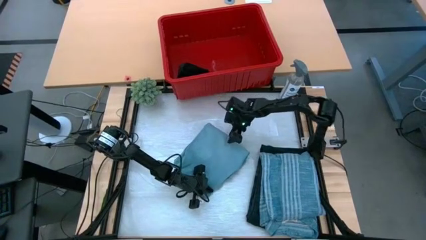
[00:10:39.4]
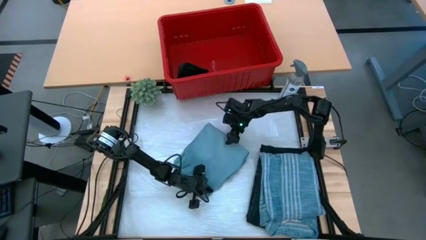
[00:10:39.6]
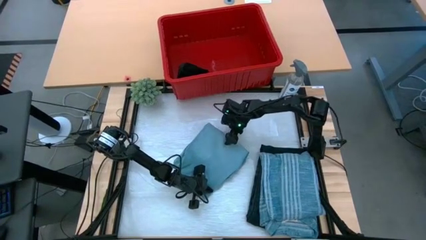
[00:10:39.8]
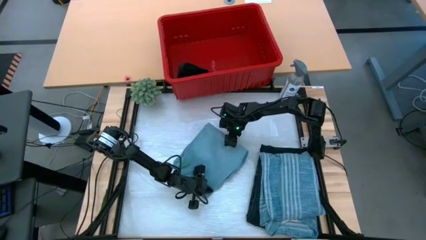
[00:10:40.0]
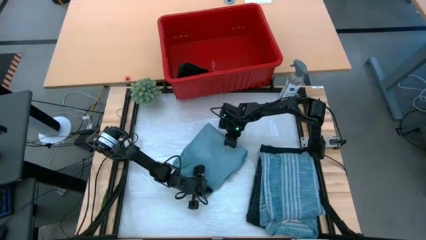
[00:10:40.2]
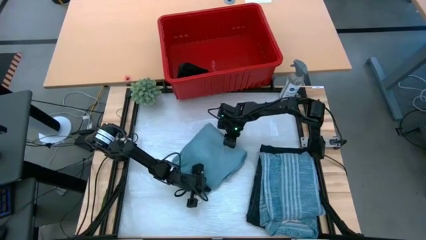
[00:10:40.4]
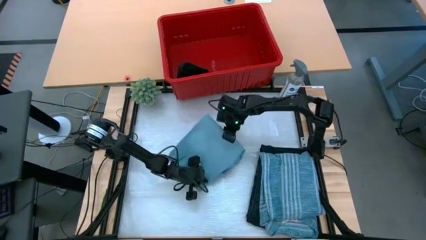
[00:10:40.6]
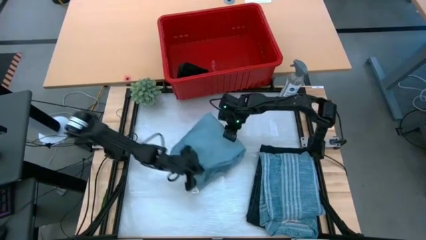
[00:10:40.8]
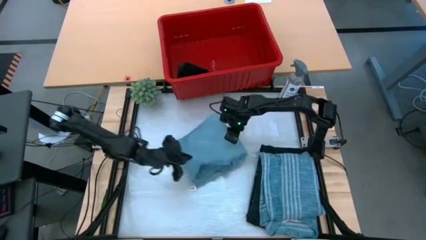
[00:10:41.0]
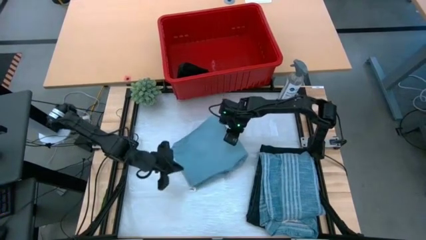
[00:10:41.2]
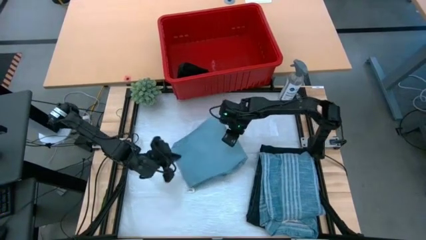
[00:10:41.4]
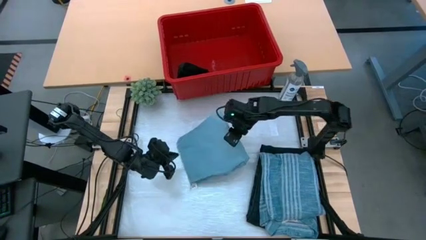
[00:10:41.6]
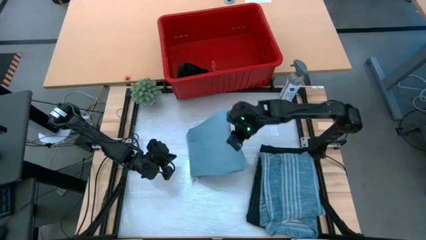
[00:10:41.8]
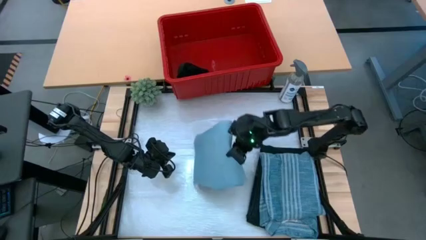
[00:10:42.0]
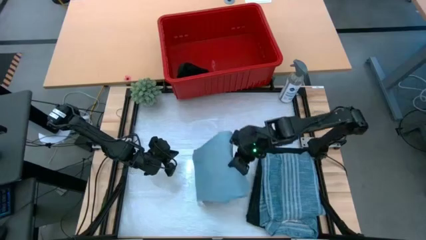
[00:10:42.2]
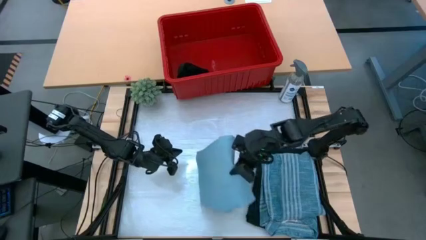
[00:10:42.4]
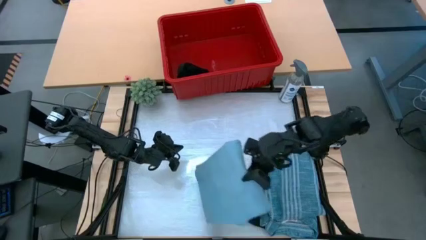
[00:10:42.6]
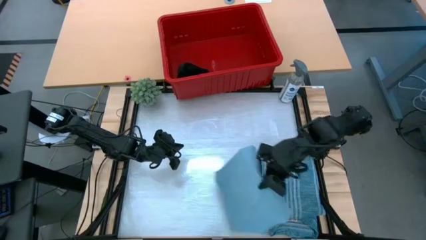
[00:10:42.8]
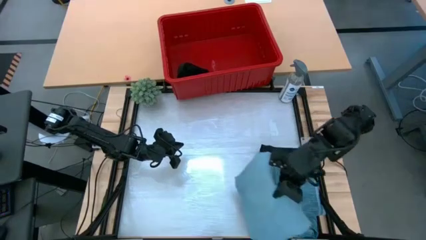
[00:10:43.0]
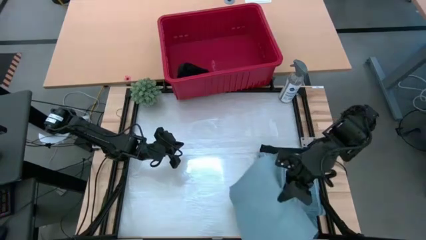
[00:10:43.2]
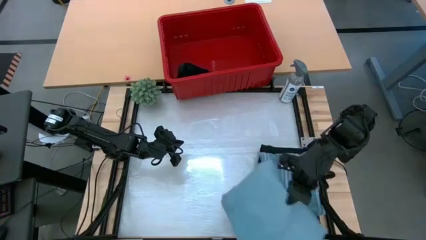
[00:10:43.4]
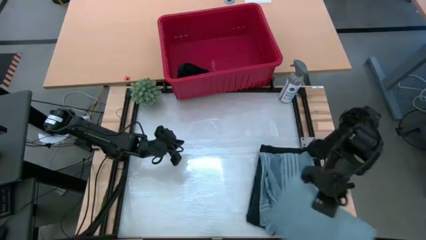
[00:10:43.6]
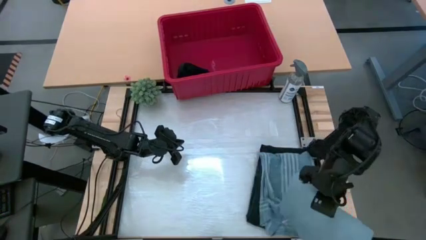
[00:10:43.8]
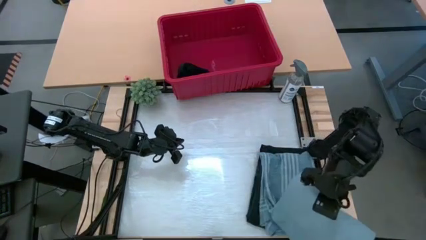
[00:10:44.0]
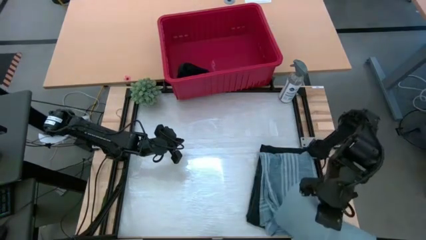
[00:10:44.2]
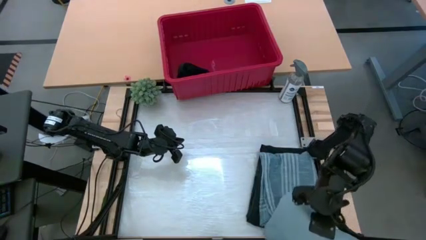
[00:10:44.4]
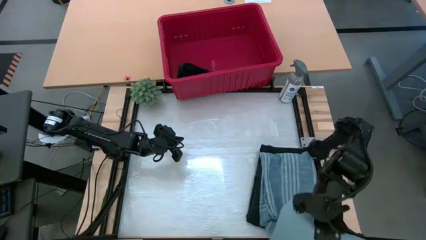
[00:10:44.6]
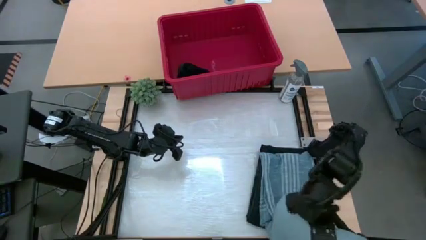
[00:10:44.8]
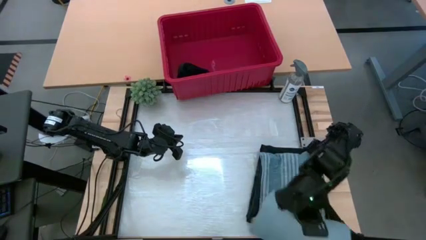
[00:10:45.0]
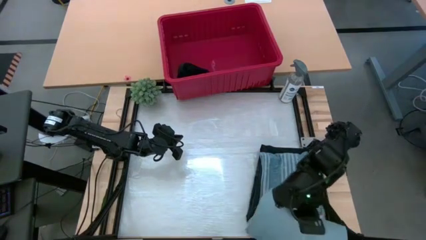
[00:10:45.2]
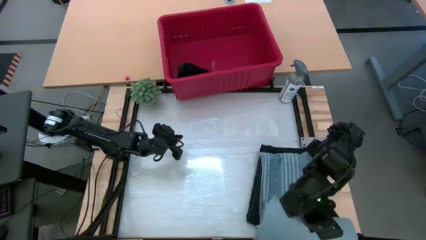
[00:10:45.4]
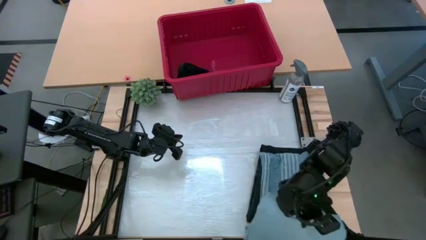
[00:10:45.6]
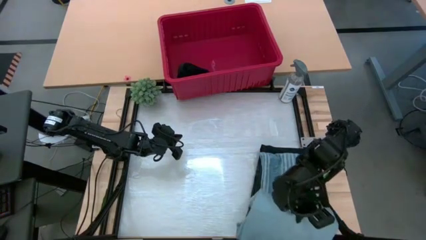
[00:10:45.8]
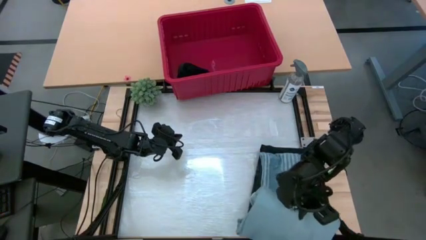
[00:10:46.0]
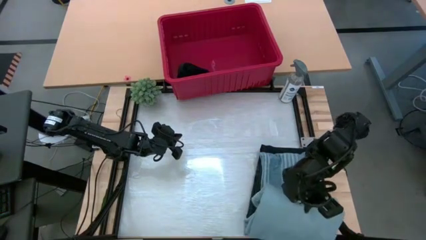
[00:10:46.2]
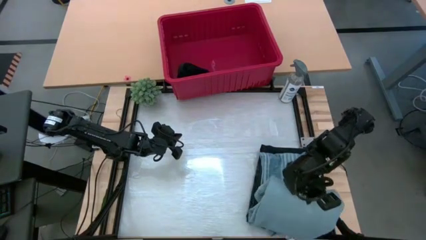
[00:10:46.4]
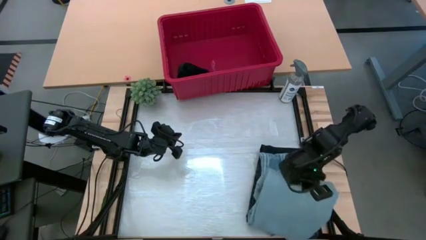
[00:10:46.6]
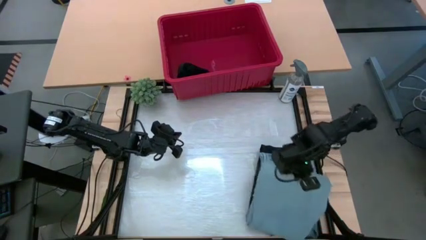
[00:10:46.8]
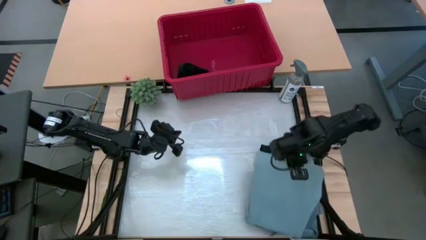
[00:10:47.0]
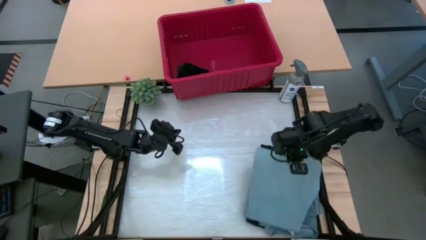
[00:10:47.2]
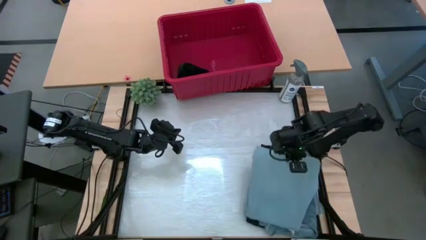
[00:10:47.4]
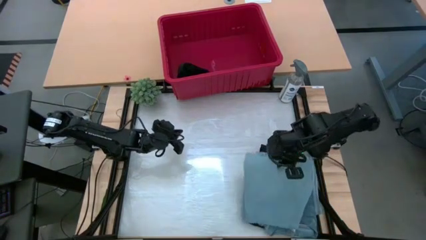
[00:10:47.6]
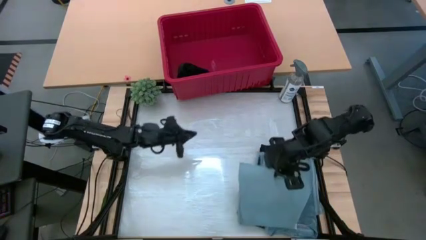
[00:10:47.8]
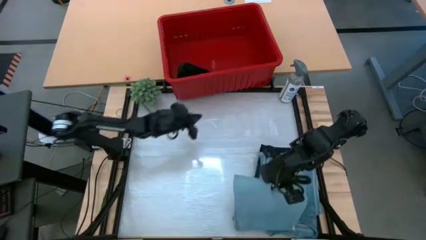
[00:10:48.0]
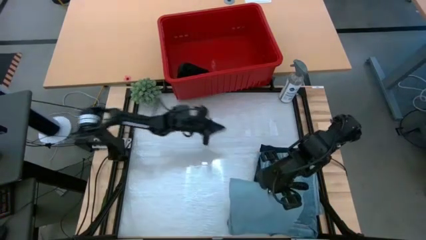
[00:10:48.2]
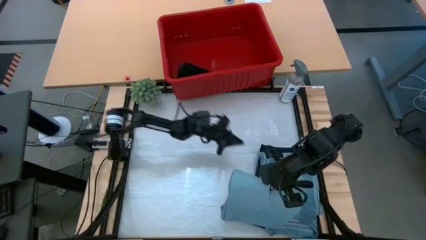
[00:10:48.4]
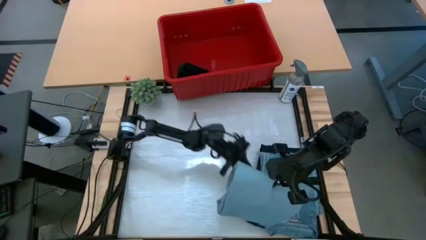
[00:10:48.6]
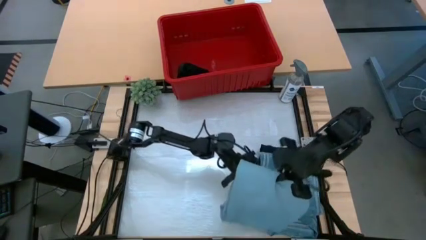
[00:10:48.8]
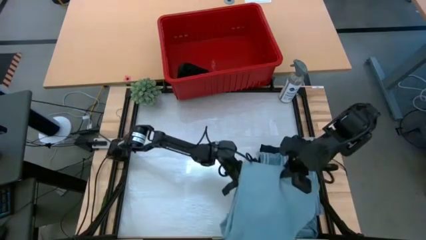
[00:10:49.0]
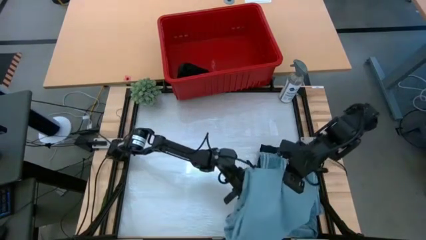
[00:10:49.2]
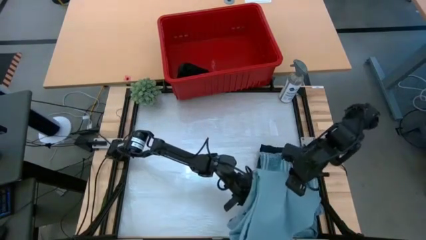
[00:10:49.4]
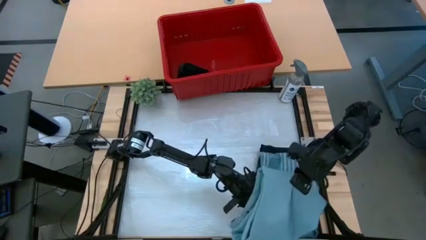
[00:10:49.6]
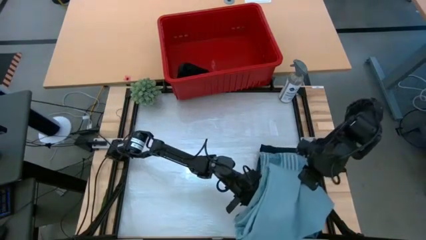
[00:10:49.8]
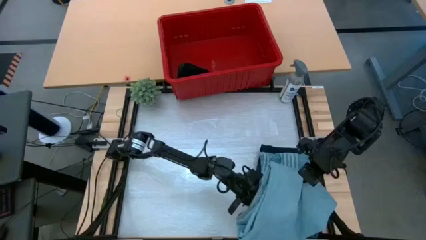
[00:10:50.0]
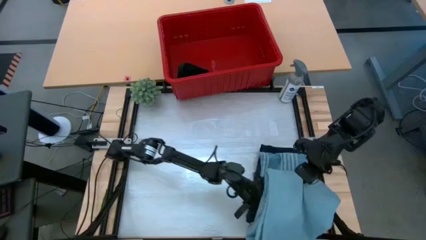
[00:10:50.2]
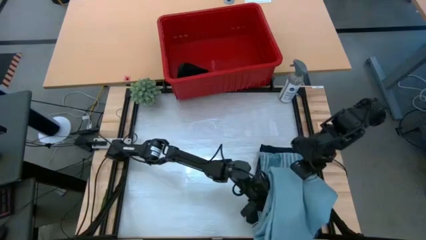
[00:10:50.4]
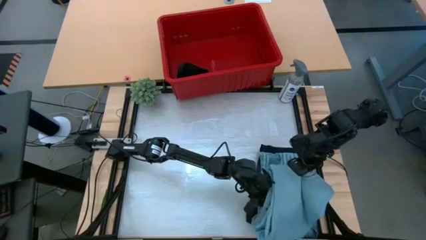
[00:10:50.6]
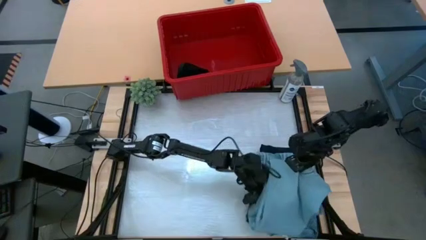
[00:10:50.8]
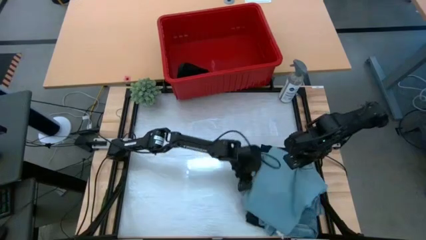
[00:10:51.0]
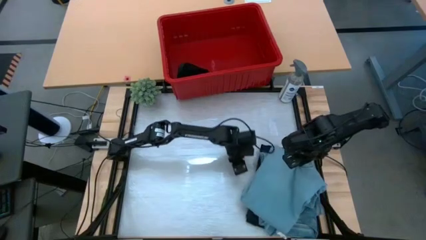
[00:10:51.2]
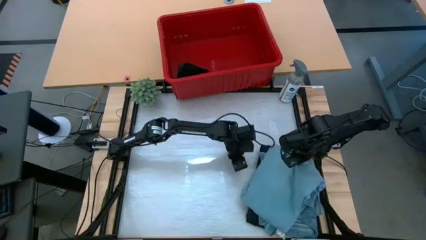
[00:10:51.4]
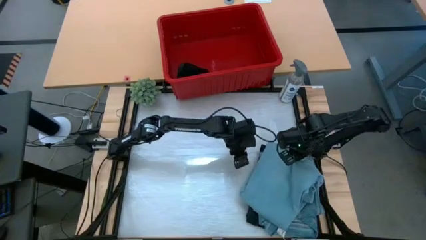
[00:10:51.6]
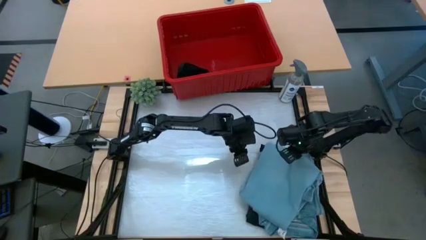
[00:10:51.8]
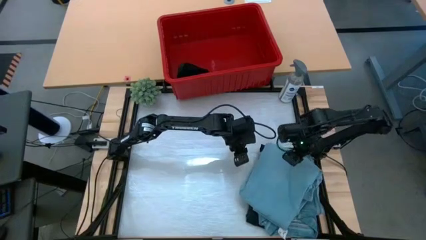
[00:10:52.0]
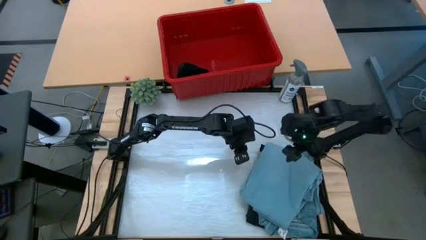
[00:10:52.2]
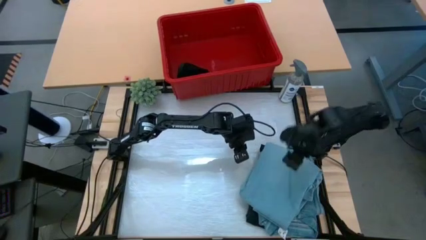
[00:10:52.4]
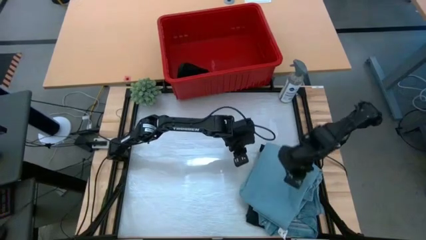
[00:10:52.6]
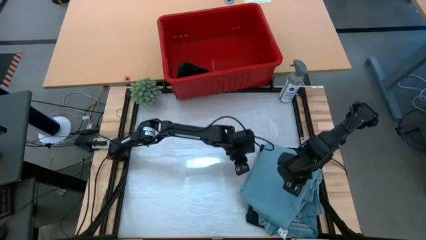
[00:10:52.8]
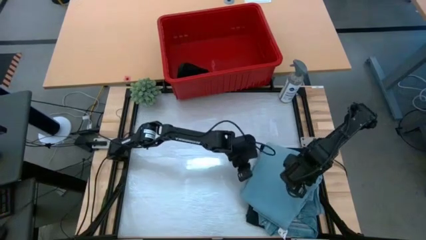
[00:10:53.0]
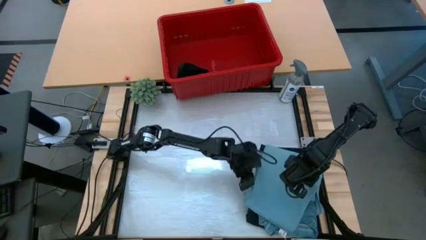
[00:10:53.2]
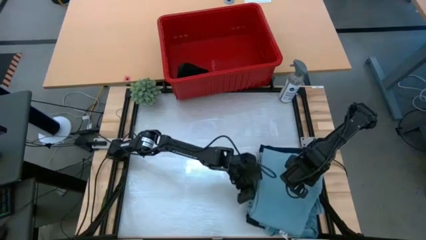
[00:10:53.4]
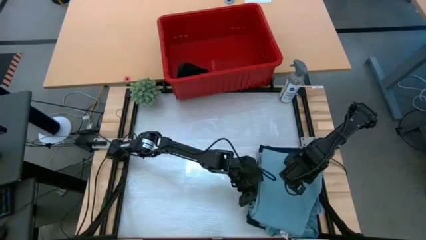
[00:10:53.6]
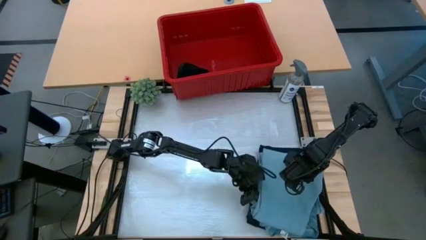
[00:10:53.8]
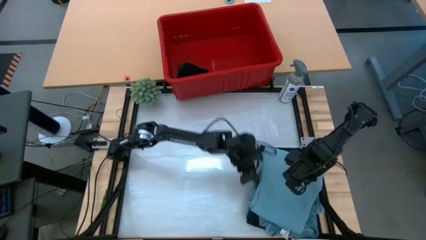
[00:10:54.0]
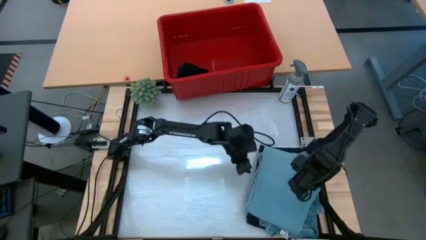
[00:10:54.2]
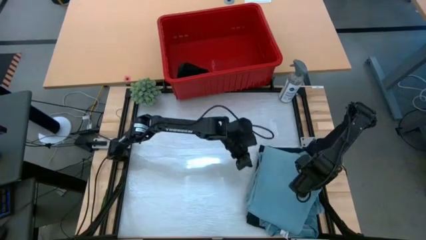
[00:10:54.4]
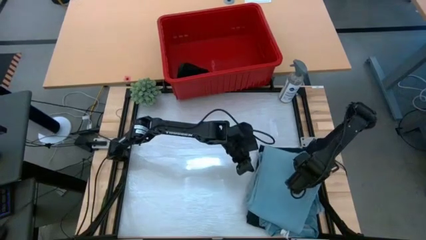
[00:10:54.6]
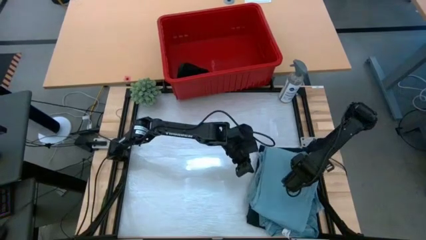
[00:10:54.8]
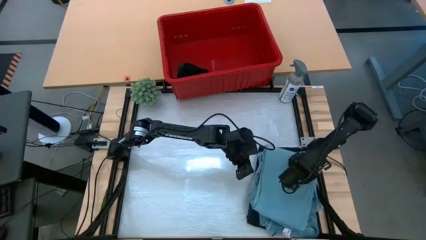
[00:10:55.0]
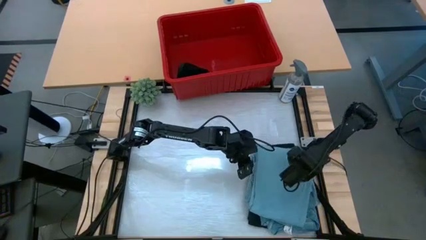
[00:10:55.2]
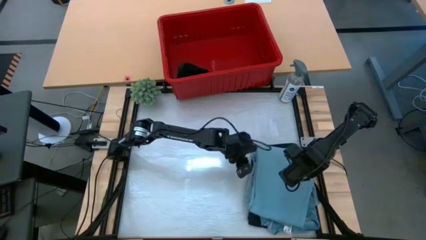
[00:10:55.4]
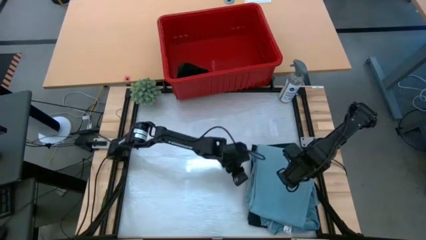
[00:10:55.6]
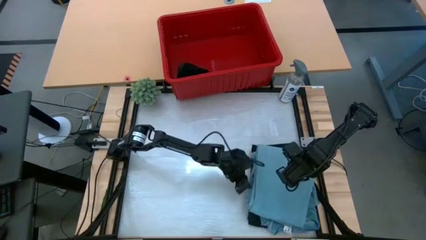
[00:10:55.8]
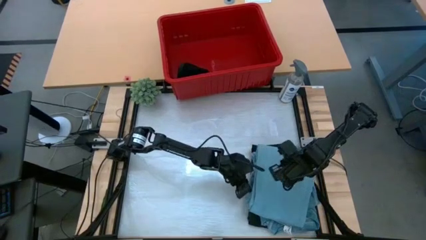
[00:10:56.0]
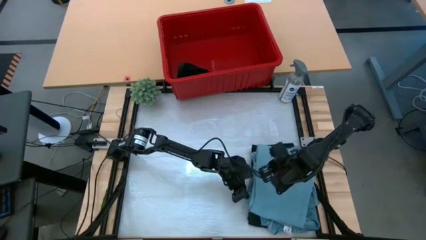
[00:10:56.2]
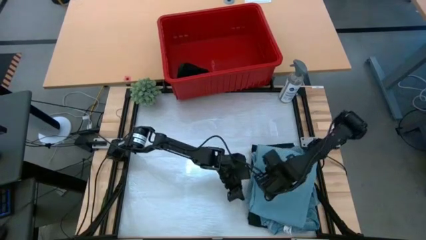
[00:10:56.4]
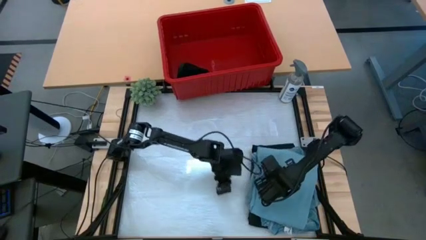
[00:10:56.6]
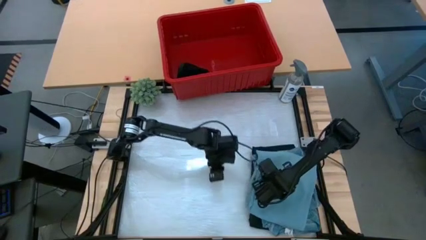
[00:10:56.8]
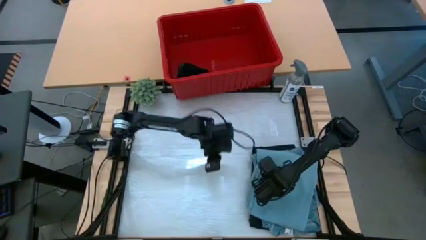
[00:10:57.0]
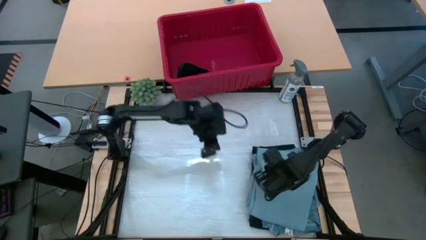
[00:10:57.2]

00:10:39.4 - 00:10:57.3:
Task: Fold Laundry from Bin
Stack the folded light blue denim pants on the blue polo shirt
